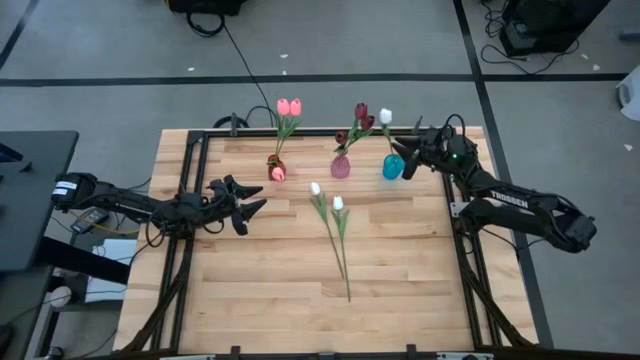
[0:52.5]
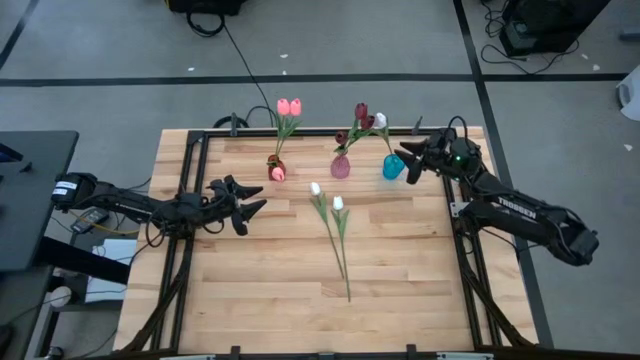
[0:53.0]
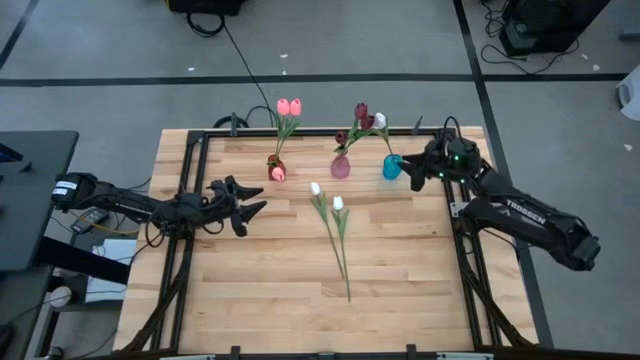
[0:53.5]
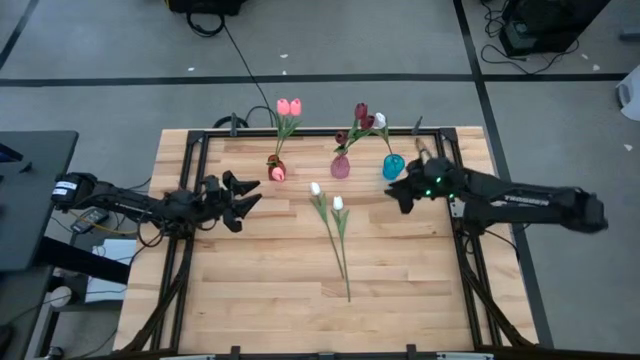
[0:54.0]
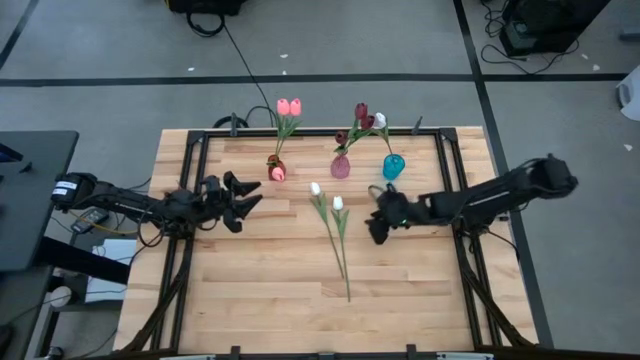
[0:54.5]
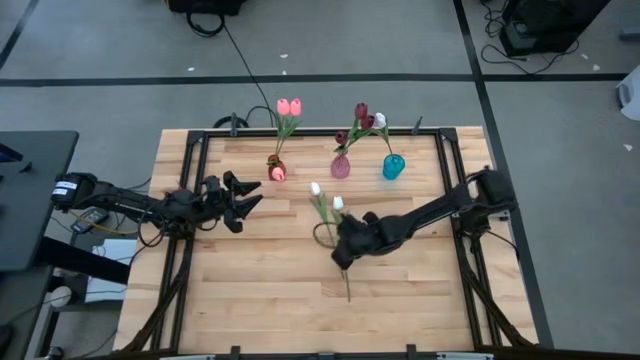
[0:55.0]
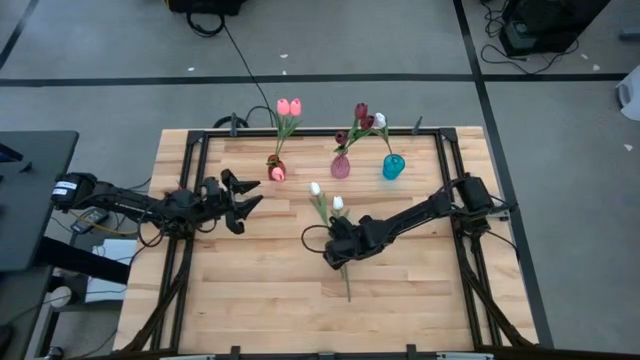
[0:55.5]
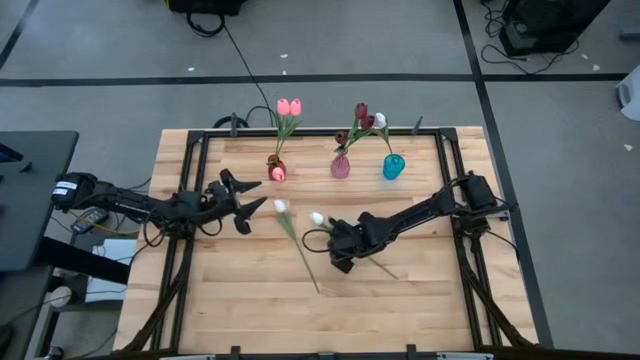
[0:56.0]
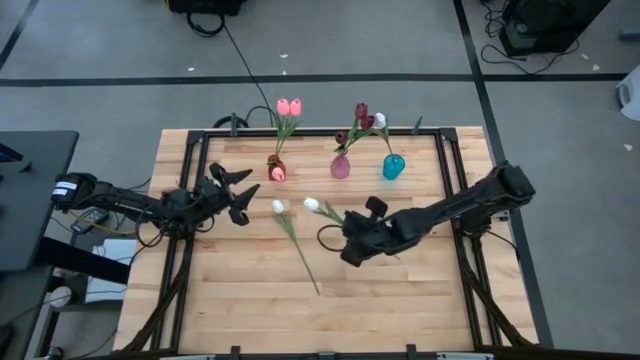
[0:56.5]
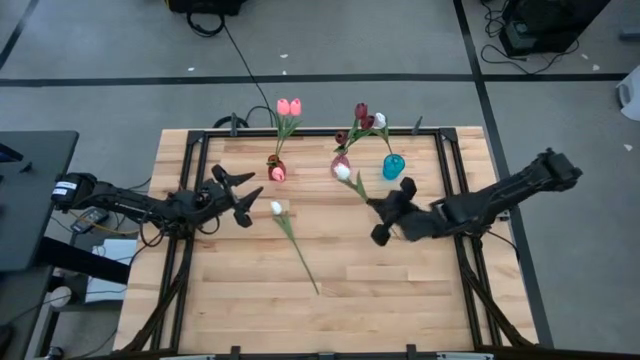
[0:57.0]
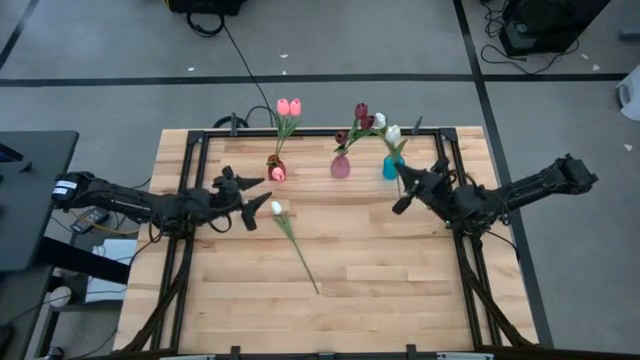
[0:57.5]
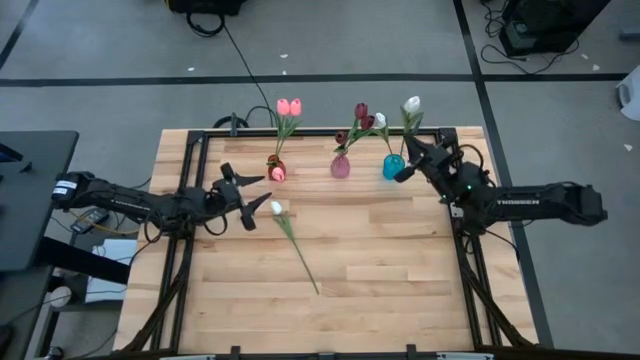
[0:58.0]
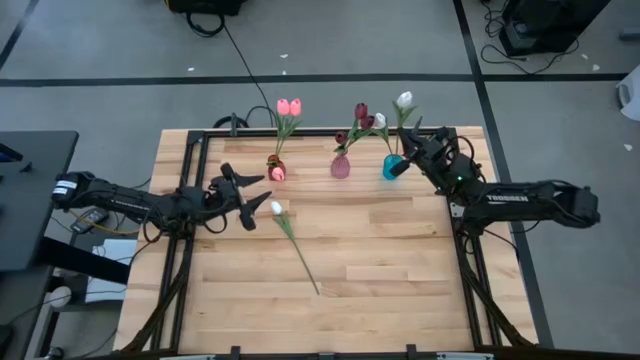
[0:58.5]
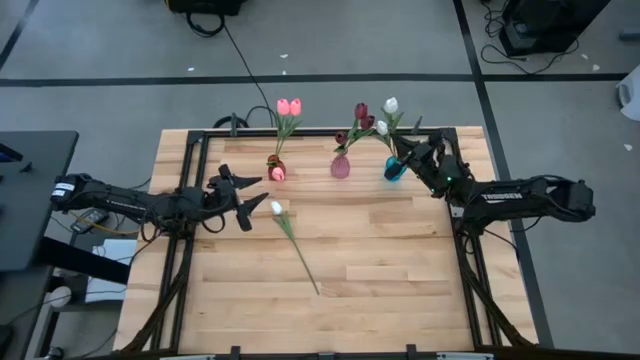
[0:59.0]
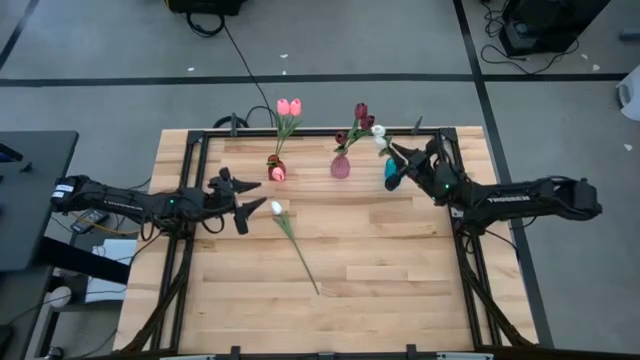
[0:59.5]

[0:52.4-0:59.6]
Task: Sort flowers into vase by color
Put the right white flower into the blue vase

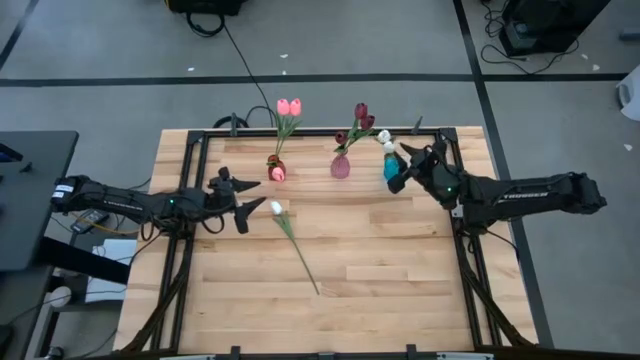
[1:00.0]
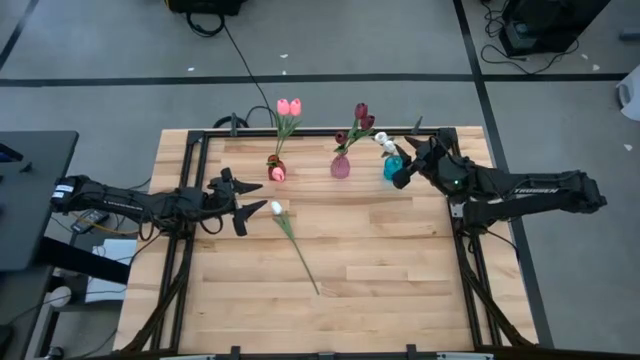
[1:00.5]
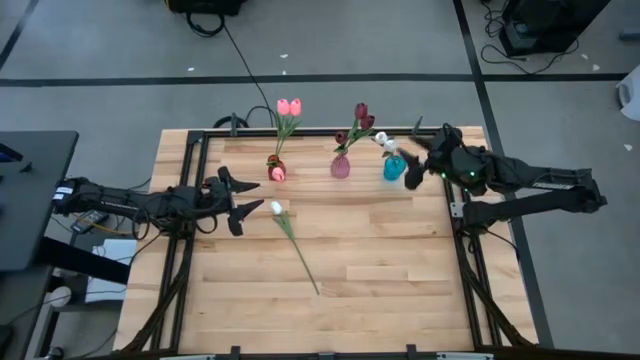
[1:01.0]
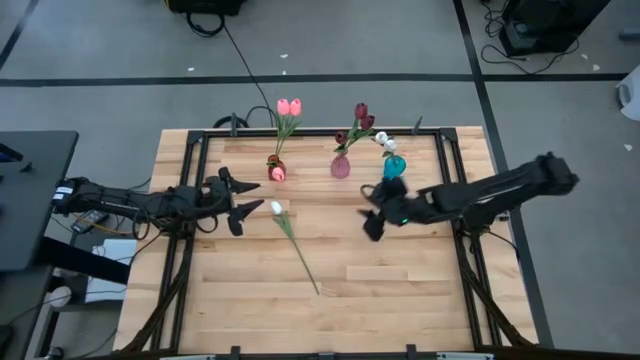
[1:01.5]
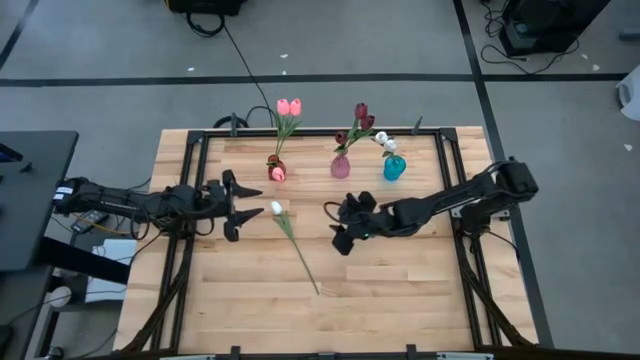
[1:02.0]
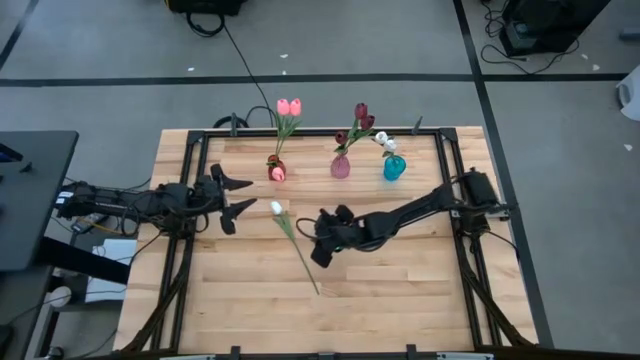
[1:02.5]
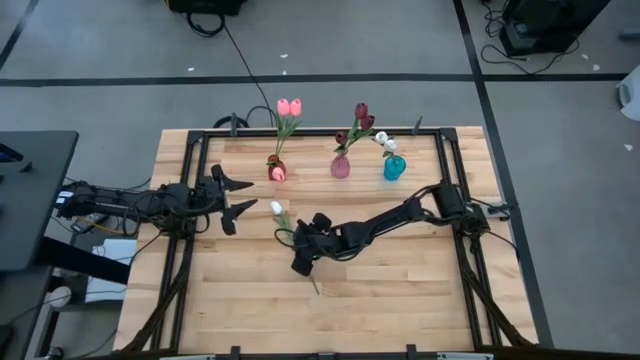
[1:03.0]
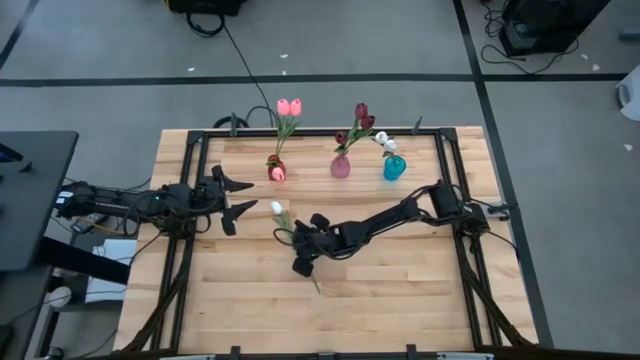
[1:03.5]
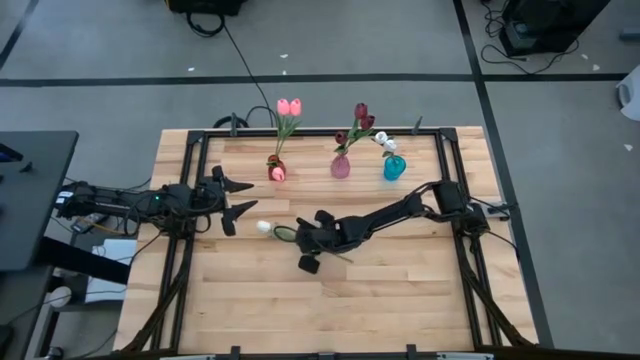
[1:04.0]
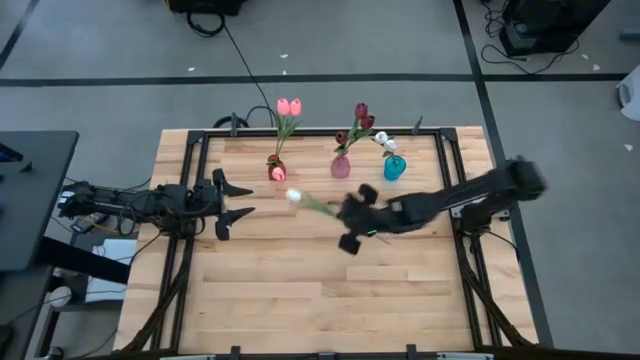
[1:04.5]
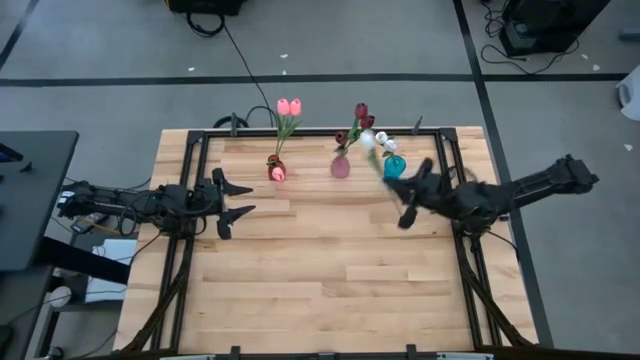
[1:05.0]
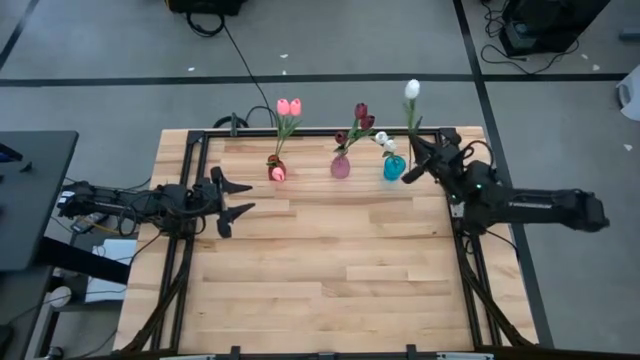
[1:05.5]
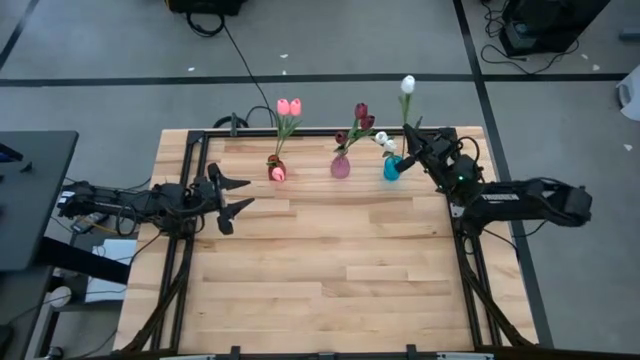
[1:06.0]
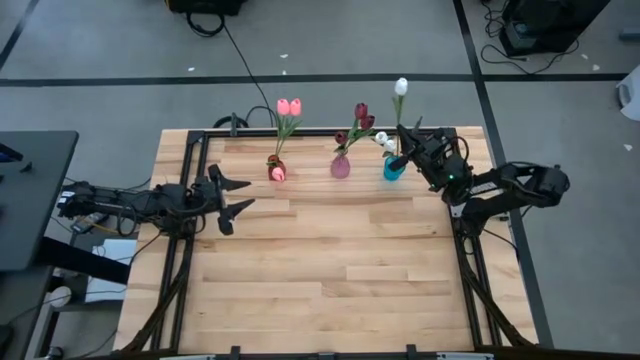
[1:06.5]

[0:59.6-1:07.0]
Put the white flower into the blue vase

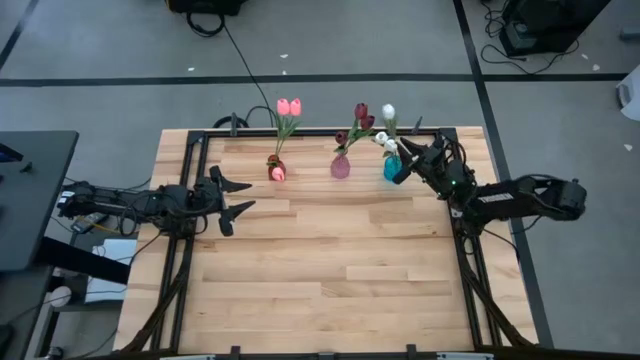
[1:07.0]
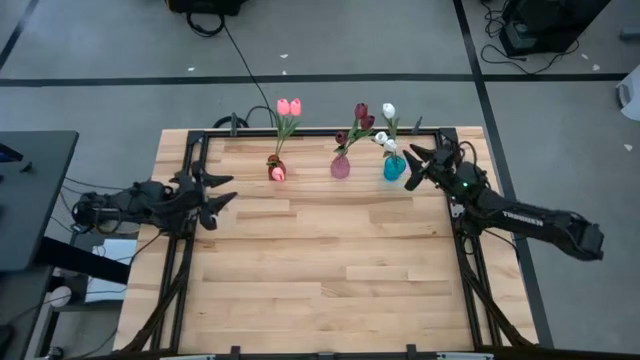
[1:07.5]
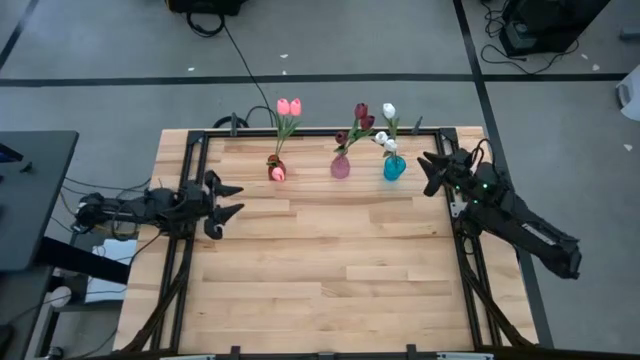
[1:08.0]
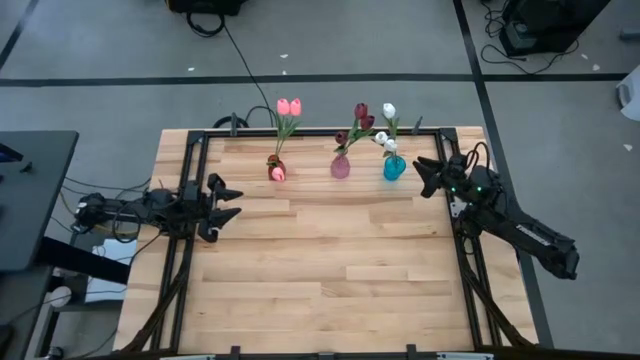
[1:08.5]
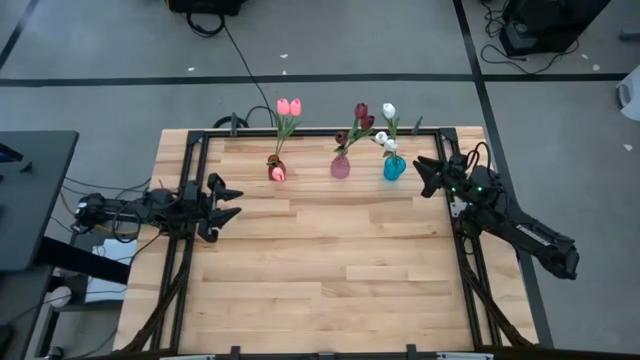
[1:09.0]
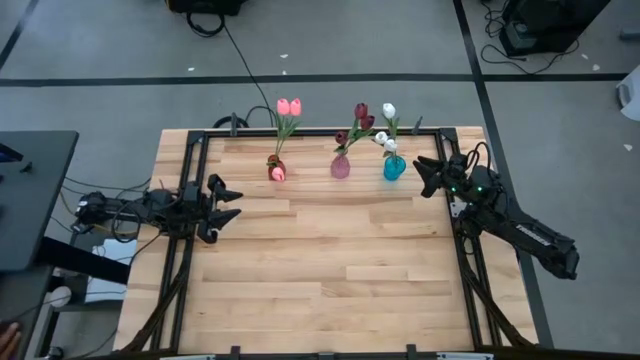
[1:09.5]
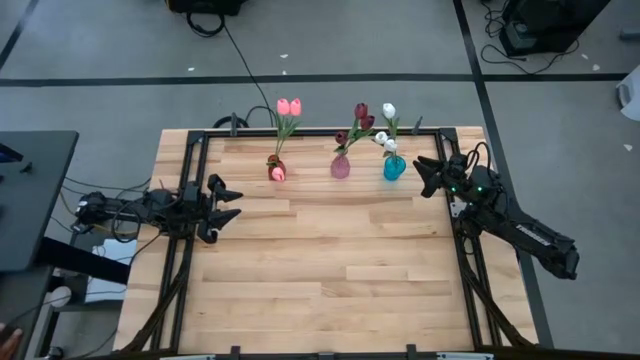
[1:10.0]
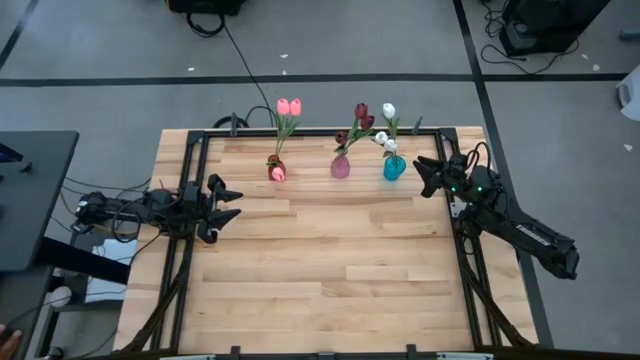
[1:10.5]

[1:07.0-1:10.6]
Return to Home Position
